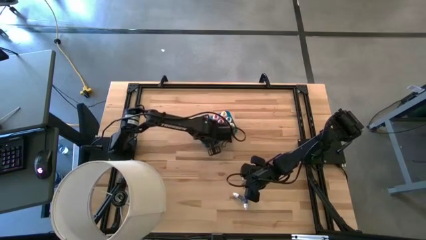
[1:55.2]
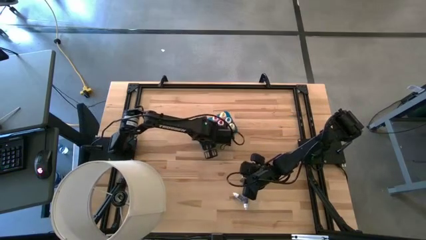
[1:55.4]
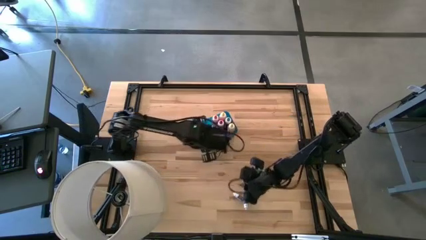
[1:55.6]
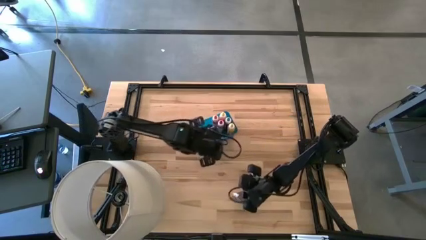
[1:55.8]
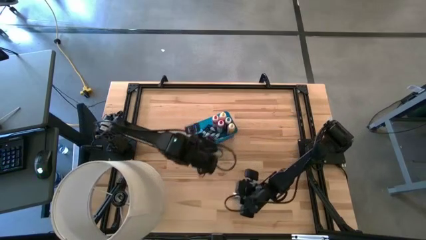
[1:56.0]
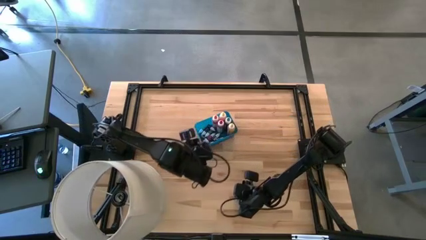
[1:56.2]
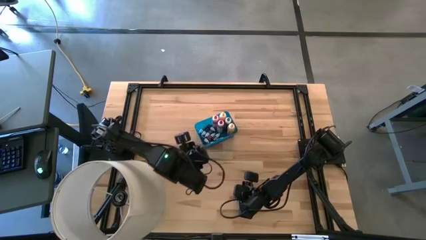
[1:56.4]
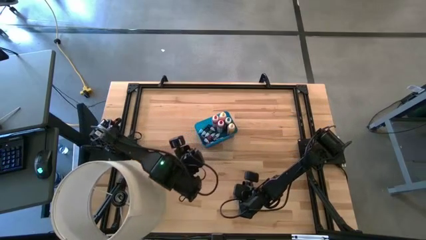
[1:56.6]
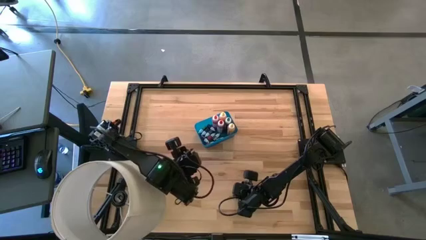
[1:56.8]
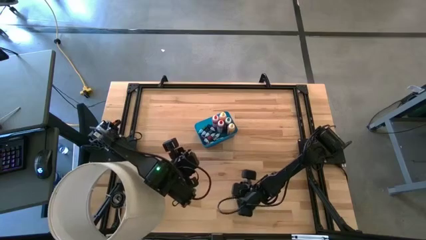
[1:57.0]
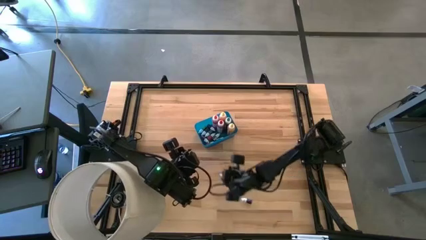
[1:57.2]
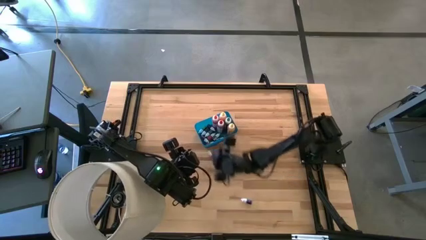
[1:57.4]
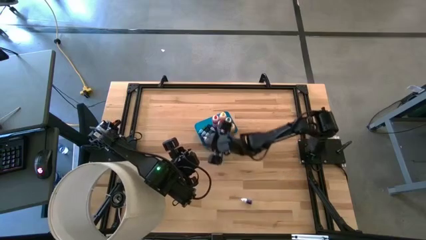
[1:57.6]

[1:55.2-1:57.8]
Task: Pick & Place food coloring
Put the small black food coloring bottle into the bin

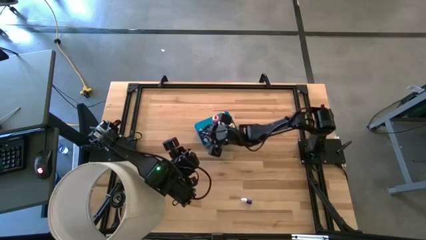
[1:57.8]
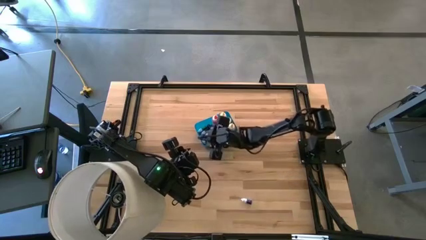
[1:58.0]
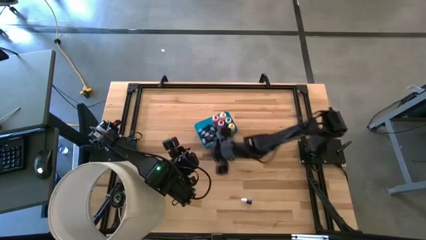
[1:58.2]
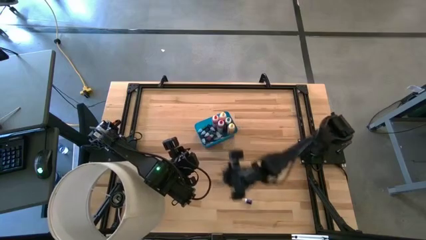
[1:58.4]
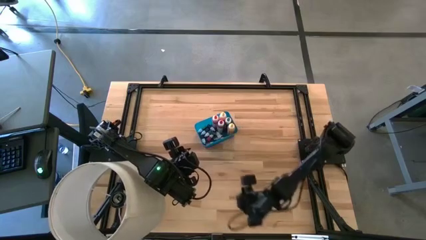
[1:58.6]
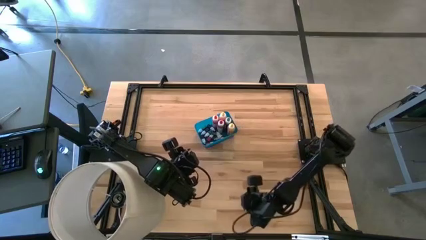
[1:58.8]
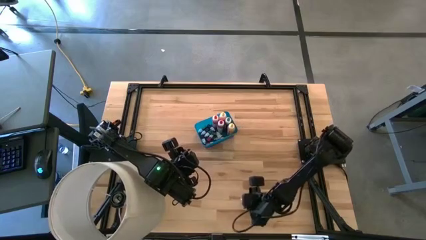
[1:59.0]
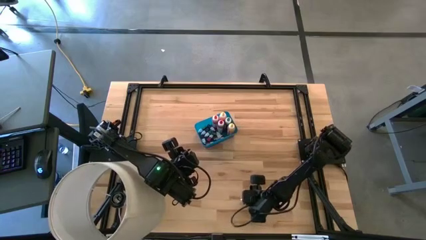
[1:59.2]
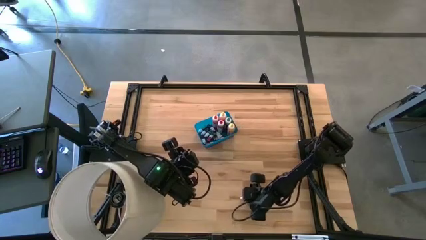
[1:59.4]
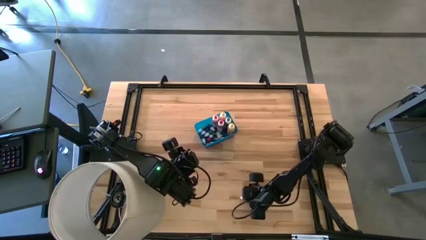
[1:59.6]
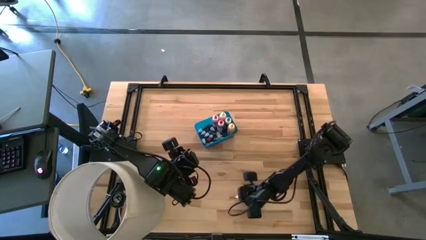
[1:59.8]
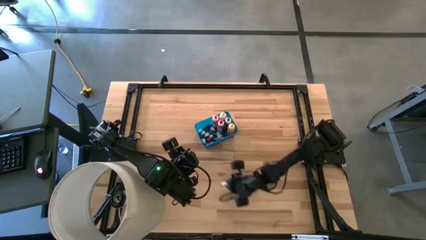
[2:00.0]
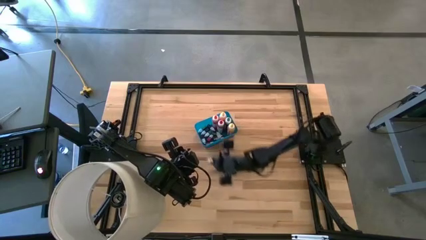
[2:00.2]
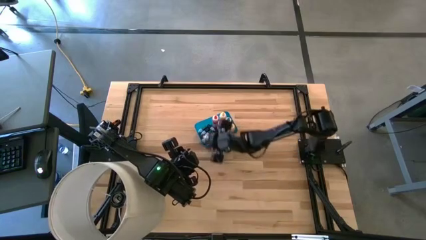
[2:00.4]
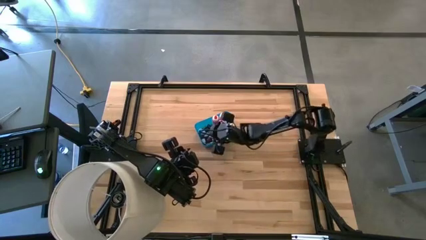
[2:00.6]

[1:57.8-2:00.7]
Put the small blue food coloring bottle into the bin

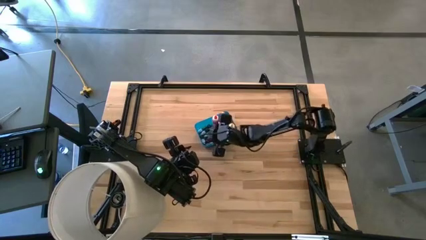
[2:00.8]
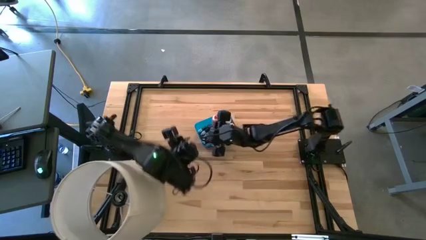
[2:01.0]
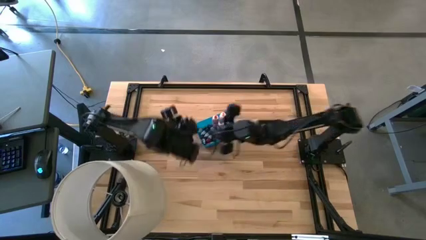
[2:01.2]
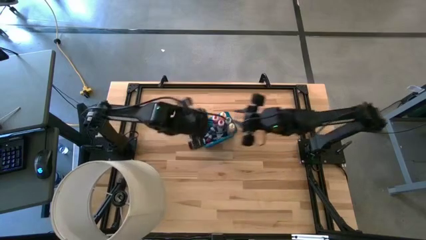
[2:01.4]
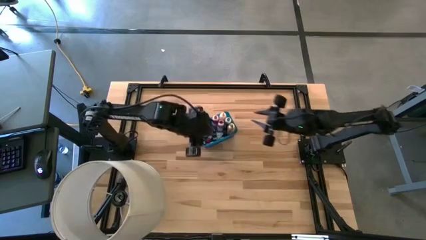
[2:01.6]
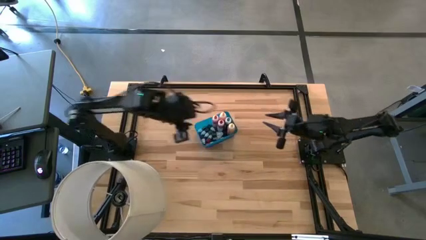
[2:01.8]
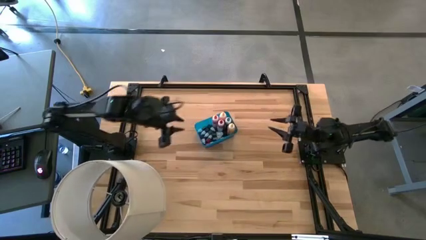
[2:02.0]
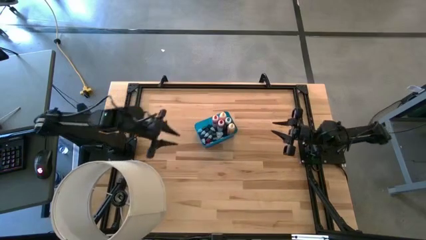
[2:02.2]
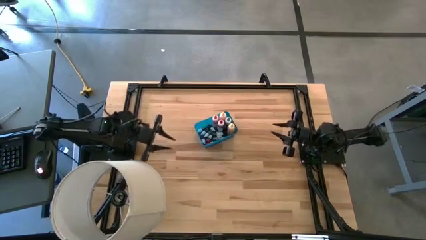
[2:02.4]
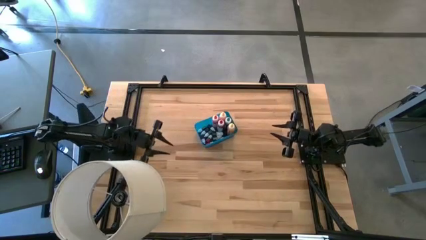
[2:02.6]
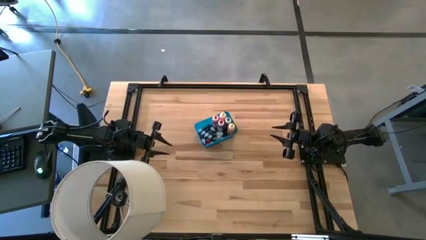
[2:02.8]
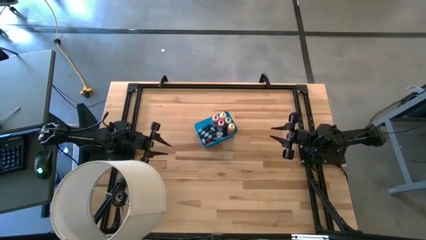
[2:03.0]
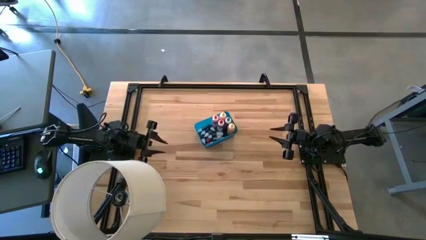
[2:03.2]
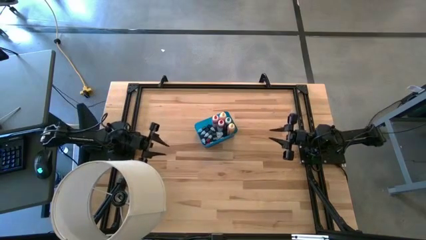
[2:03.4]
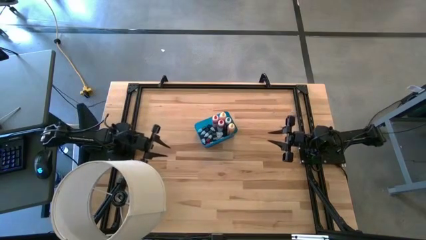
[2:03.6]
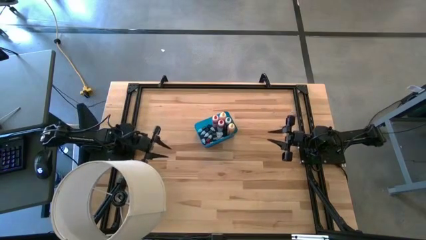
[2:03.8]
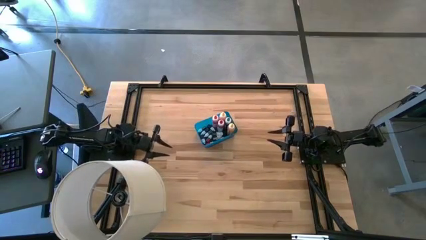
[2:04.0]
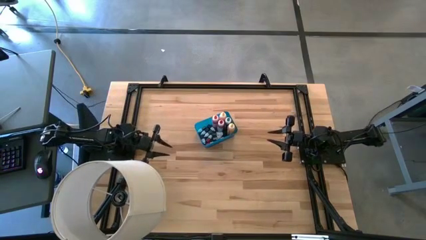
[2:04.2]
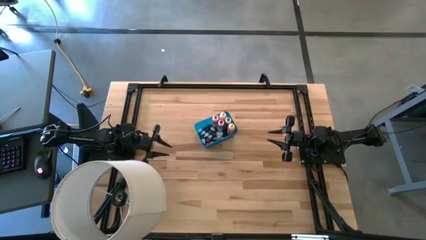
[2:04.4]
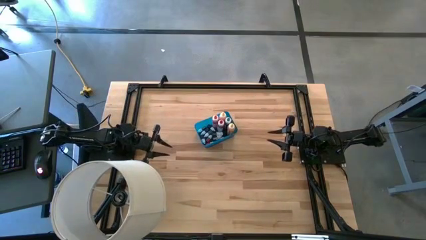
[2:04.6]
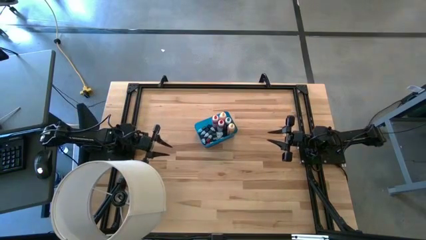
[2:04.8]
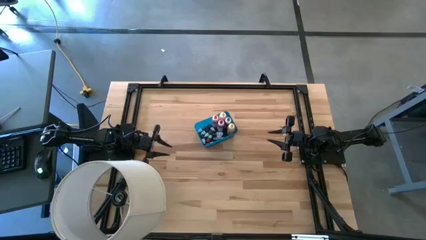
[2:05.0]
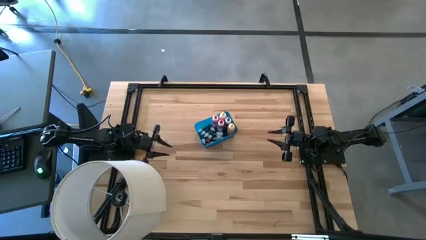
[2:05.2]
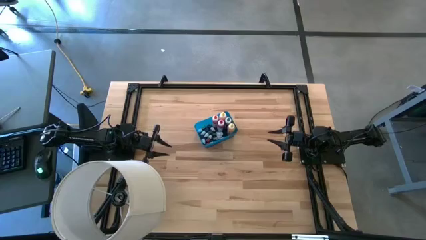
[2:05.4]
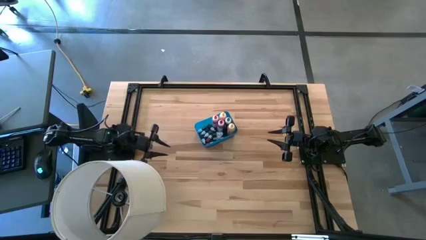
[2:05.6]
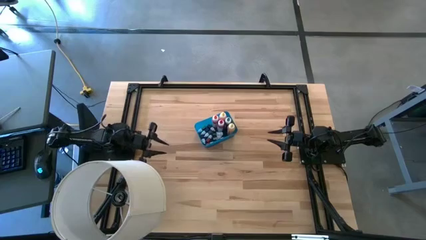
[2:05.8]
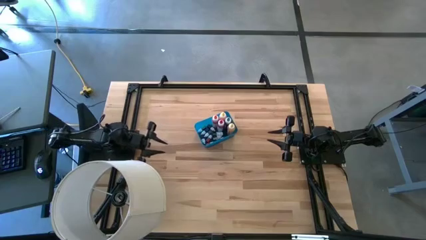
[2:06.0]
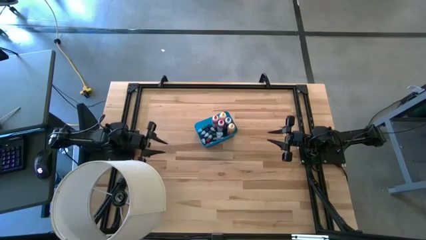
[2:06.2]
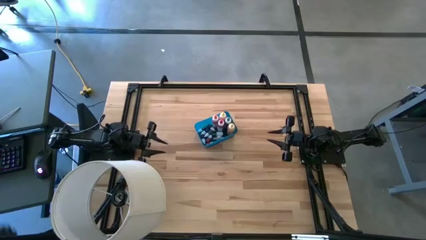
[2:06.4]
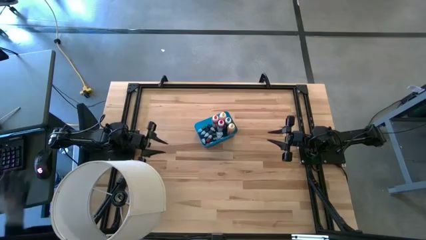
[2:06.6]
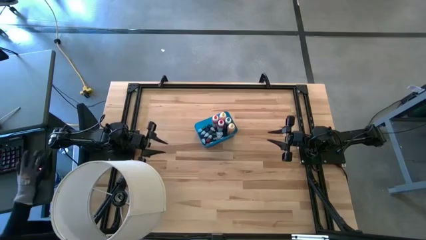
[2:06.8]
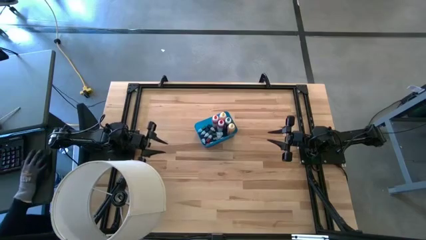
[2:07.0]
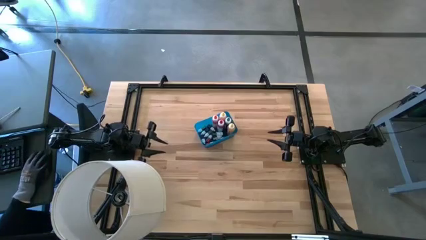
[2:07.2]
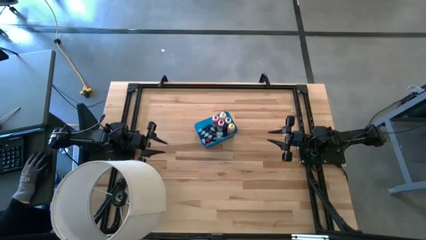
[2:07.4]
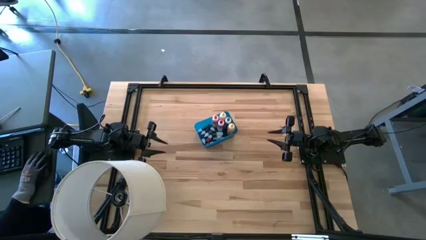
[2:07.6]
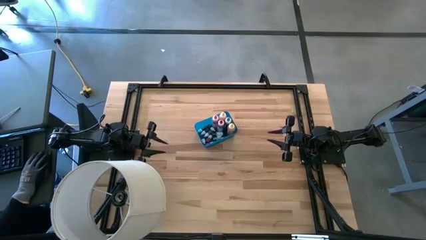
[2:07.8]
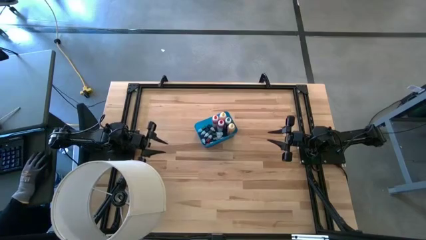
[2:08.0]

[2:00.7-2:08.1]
Return to Home Position

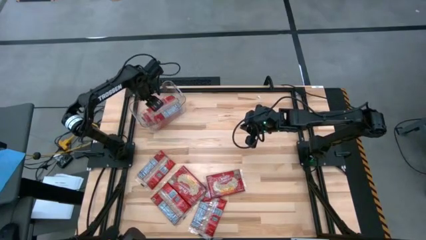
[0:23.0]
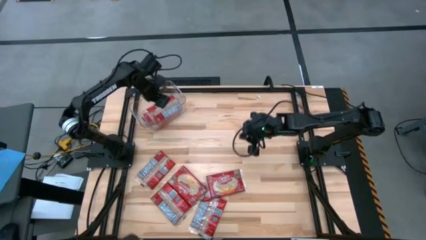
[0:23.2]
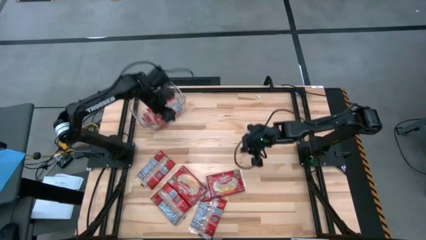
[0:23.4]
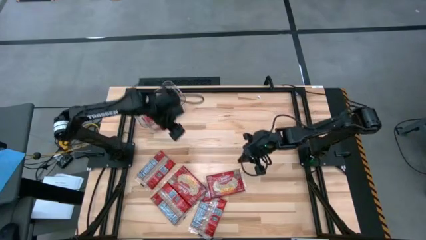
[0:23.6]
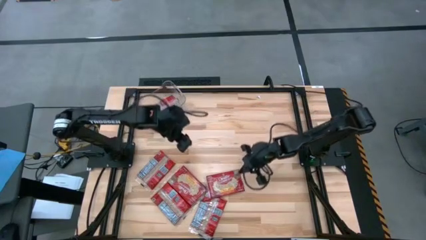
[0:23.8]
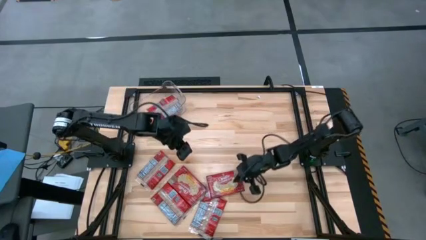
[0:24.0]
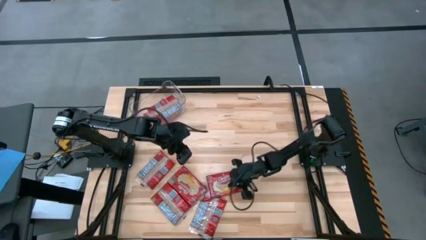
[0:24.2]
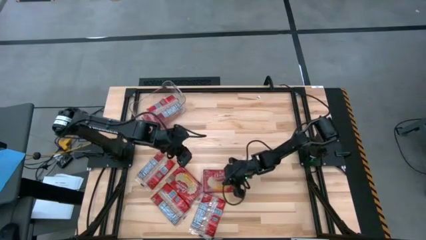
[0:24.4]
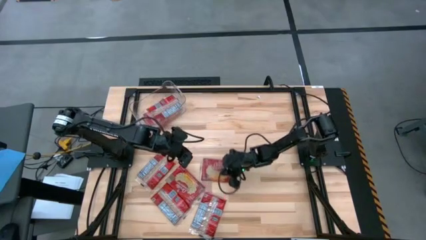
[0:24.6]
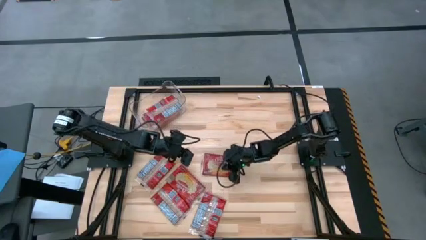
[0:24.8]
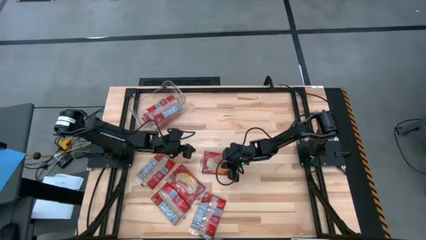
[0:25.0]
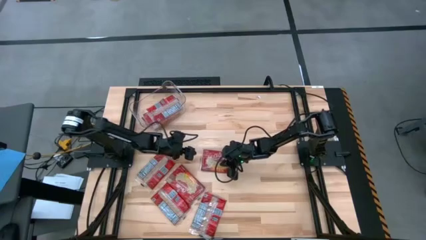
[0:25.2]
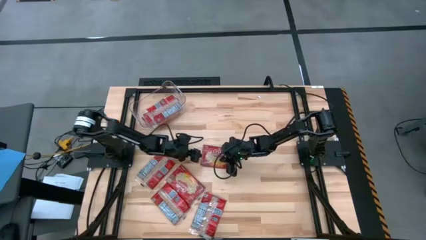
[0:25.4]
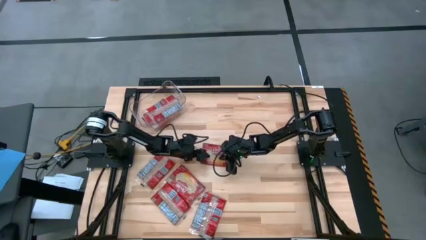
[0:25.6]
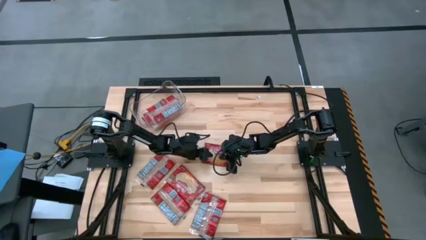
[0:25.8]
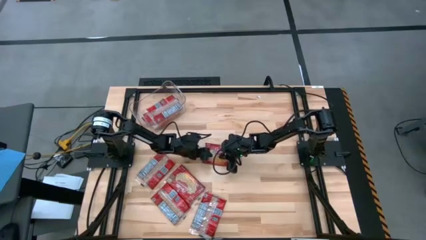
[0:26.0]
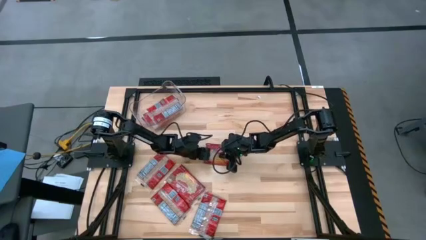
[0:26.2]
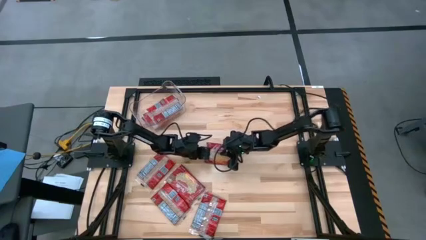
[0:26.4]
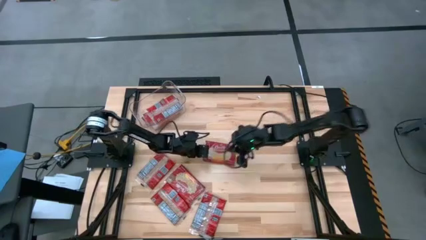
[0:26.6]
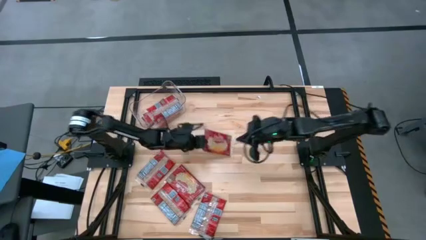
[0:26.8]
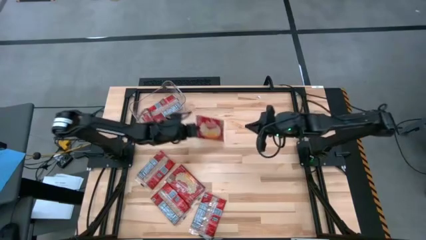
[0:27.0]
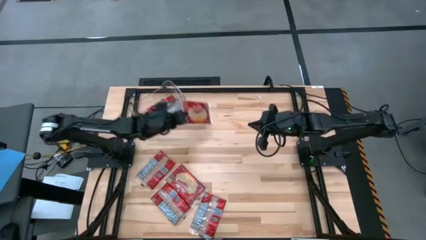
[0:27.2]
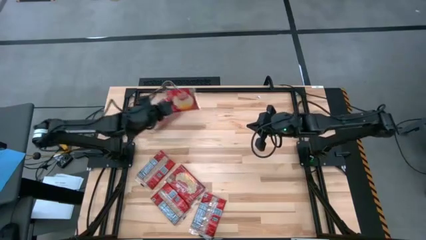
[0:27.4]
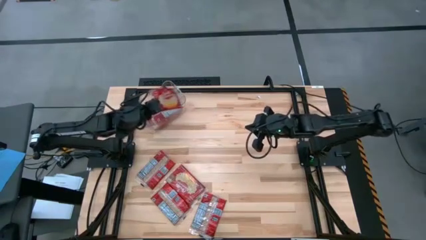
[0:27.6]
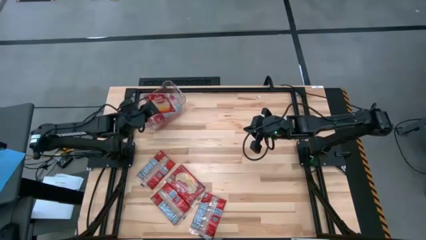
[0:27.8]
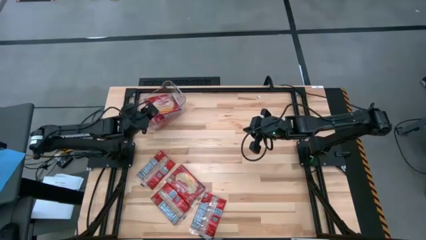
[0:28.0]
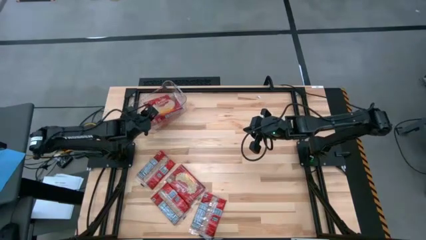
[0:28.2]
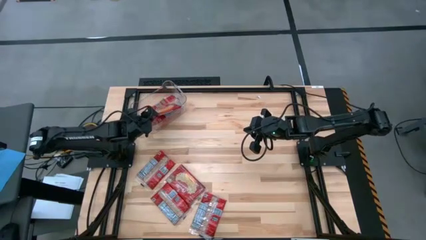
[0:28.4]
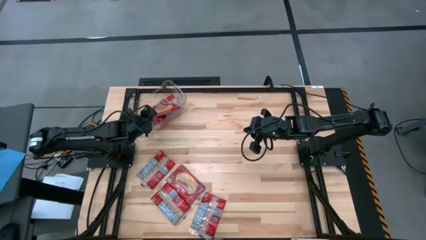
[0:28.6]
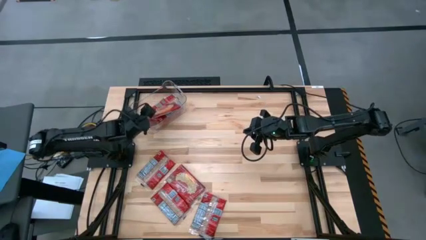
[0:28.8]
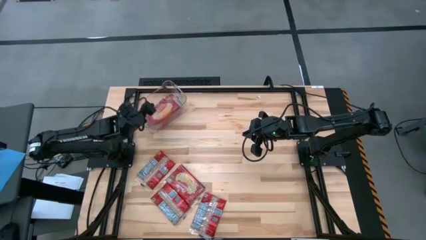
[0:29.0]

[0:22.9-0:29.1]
Task: Sort popcorn bags into baskets
Put the red popcorn bag into the transparent bin
